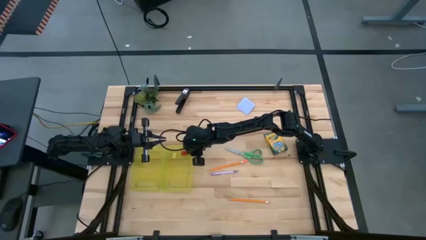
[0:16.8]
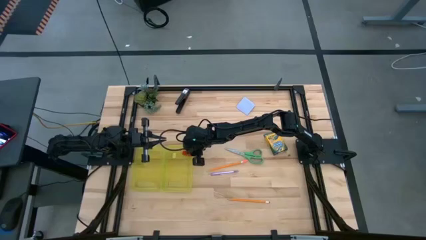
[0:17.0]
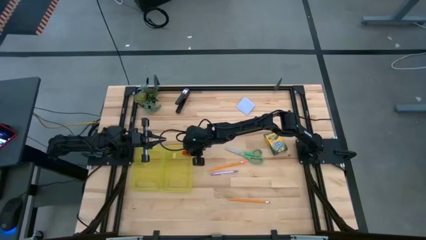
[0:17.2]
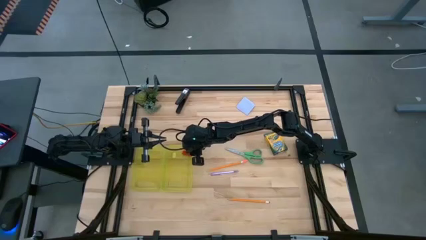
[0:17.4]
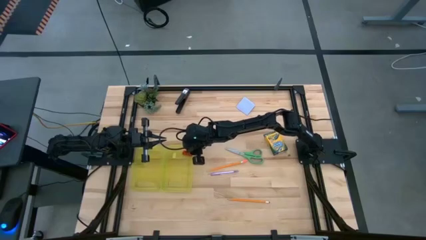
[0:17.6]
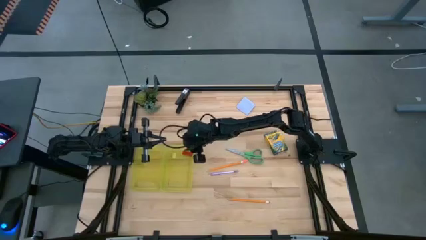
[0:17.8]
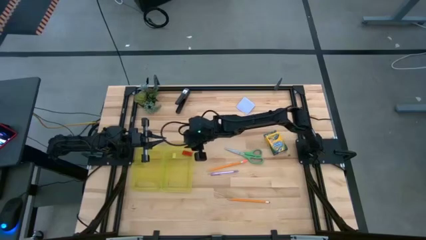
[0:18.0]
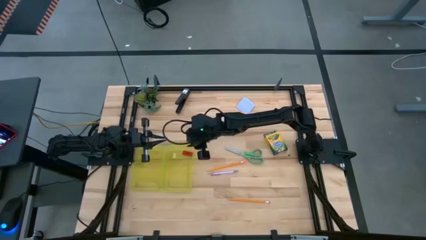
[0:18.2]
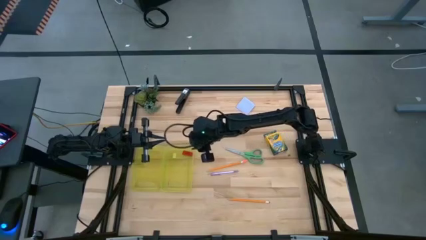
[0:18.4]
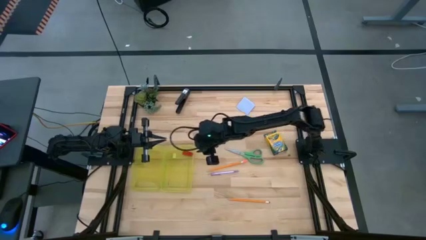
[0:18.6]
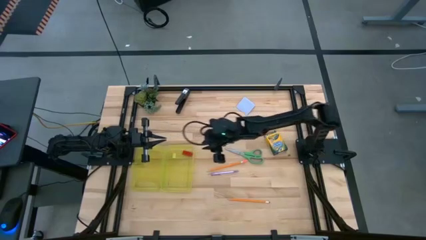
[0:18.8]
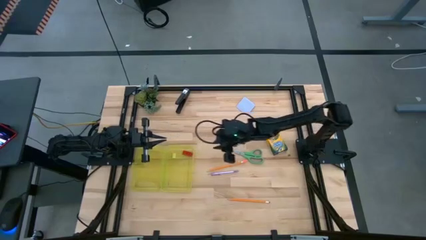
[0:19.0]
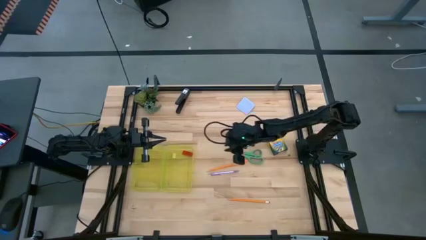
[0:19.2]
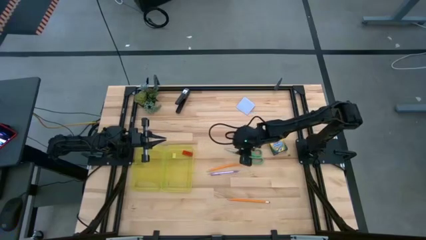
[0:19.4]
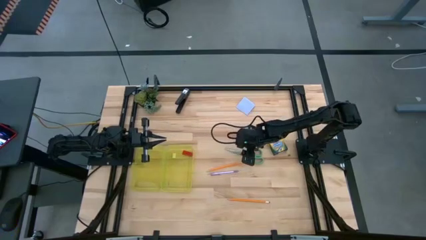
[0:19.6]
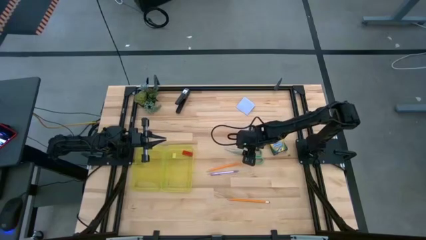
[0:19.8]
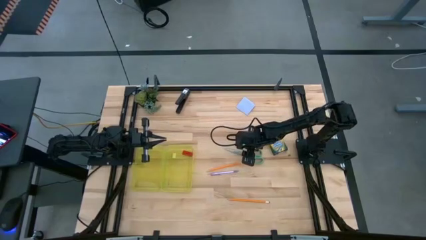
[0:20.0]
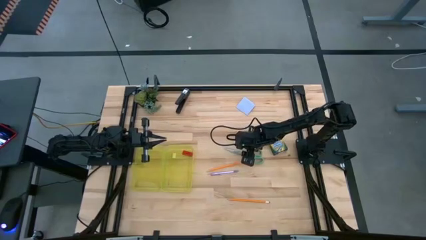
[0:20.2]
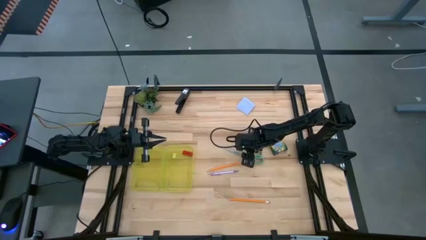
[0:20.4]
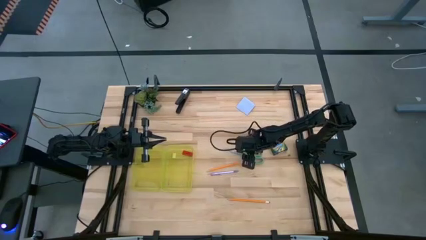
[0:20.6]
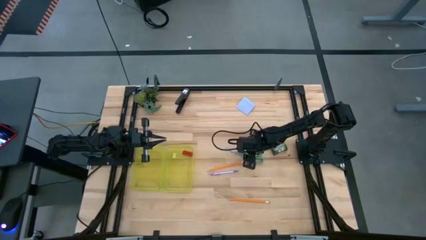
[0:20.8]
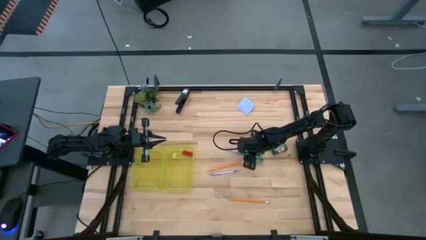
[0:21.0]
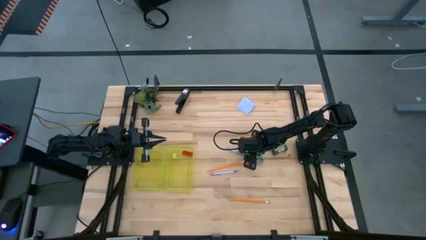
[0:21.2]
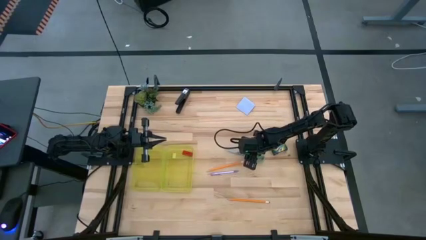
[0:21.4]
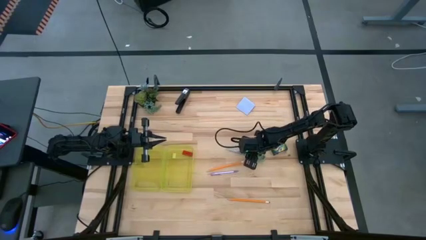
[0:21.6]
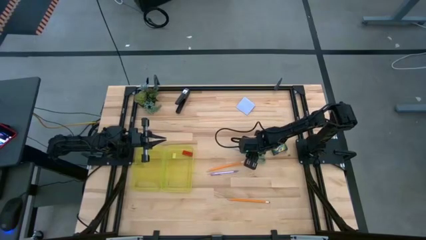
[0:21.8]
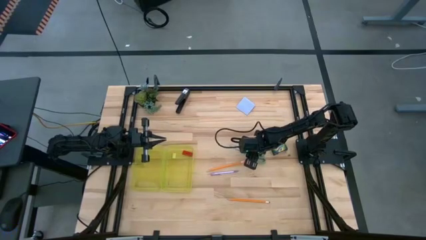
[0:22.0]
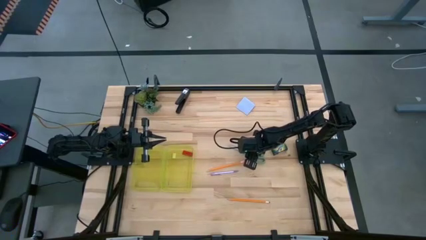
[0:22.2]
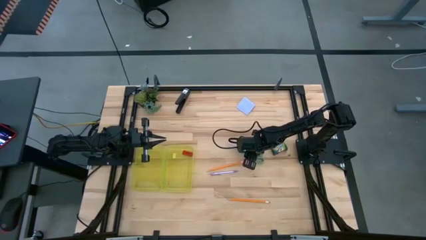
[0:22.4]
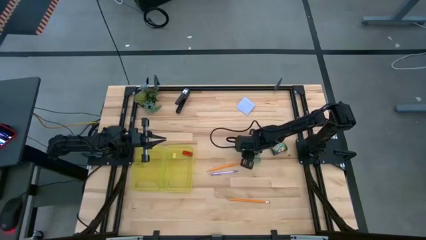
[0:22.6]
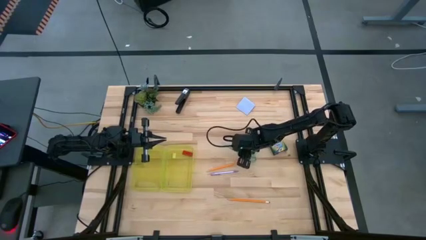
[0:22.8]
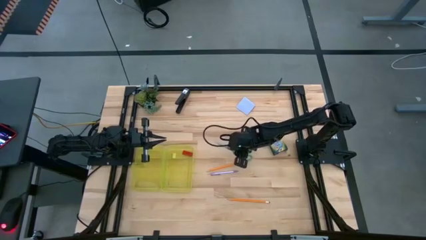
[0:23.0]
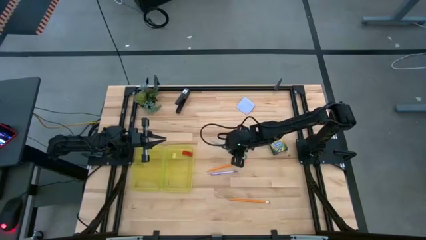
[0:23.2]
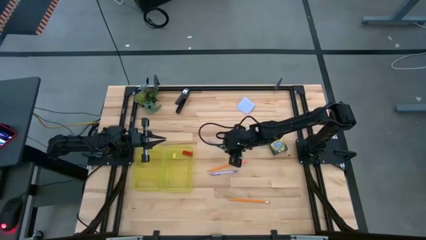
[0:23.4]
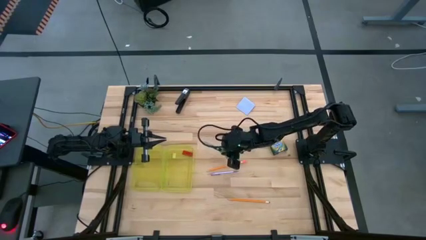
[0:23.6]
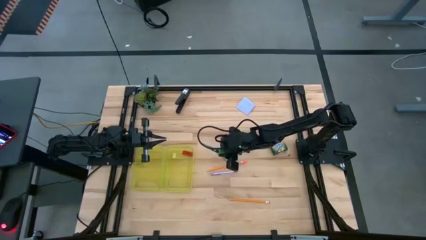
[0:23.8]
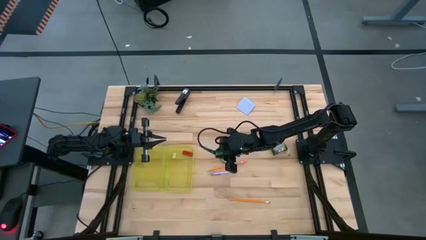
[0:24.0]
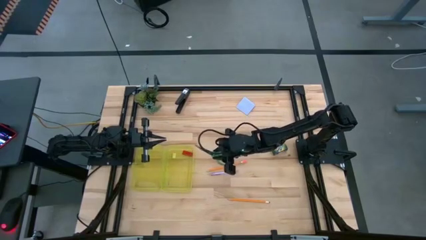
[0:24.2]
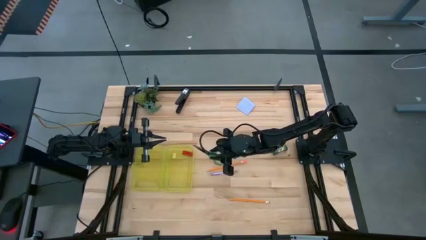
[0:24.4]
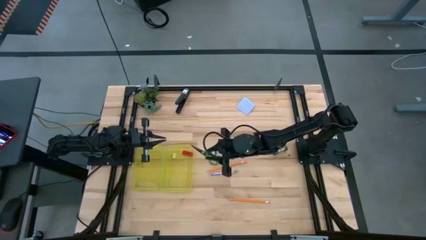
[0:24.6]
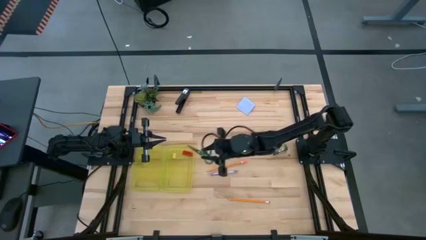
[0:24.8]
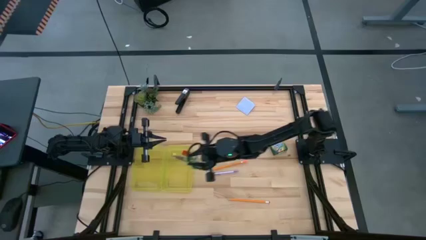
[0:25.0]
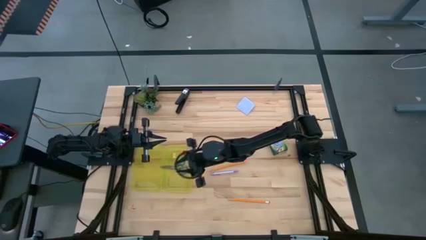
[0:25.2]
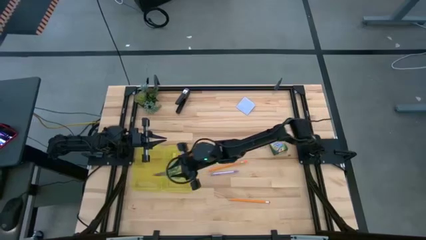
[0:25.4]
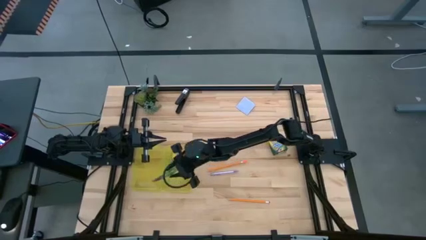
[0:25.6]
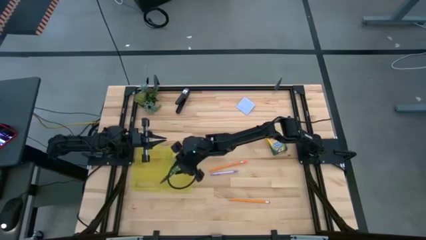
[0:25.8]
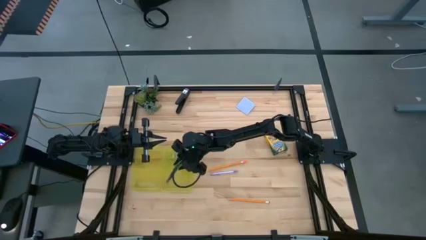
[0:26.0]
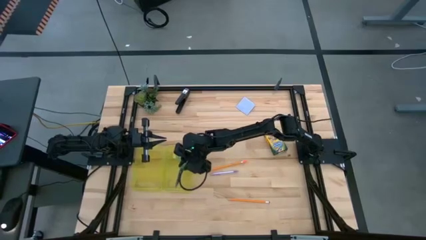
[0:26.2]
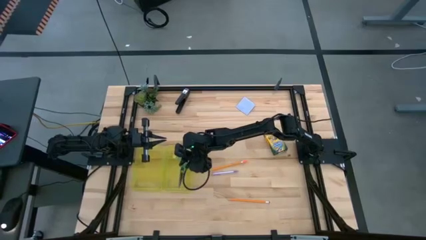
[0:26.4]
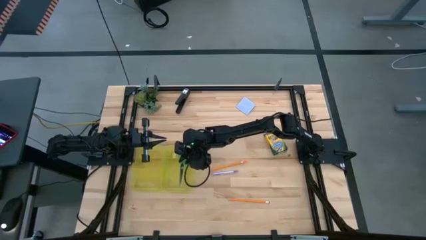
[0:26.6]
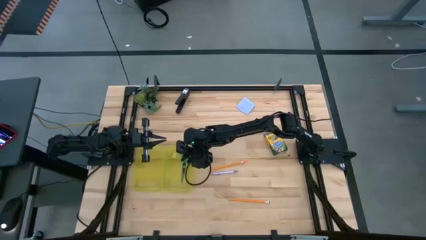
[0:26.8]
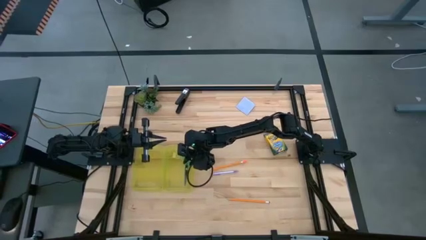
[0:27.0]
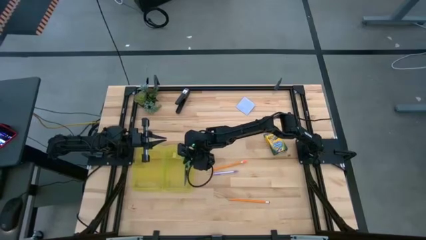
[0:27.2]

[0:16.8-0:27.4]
Task: Pack school essentials
Put the green scissors into the yellow pencil box

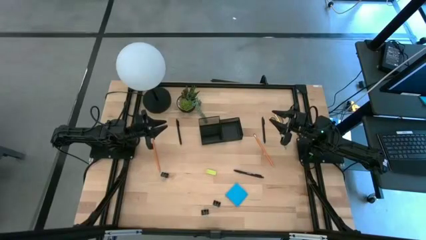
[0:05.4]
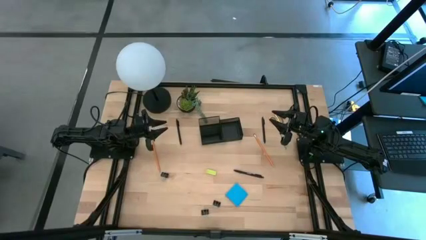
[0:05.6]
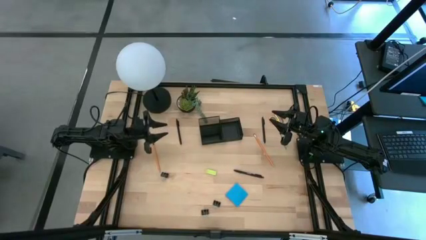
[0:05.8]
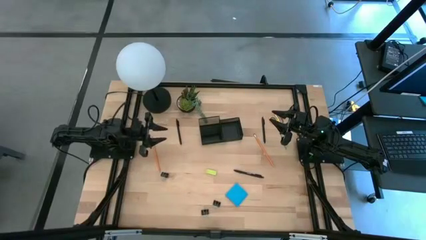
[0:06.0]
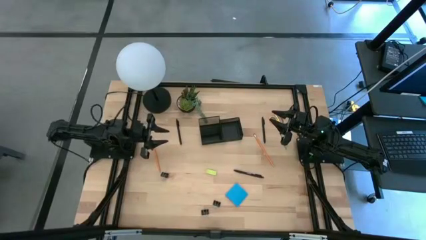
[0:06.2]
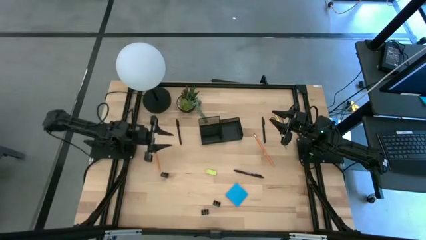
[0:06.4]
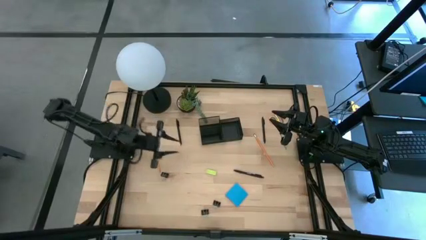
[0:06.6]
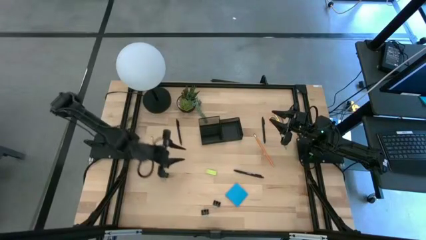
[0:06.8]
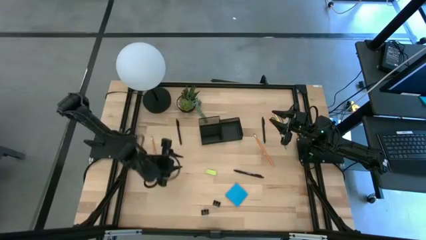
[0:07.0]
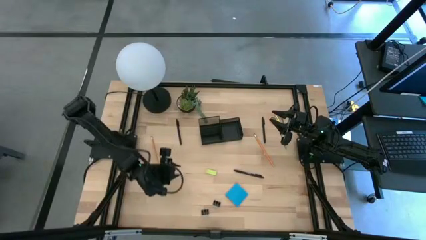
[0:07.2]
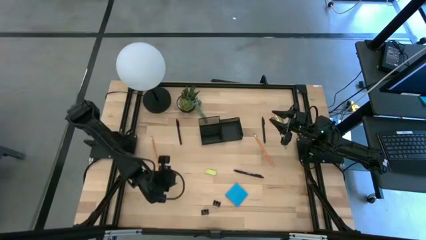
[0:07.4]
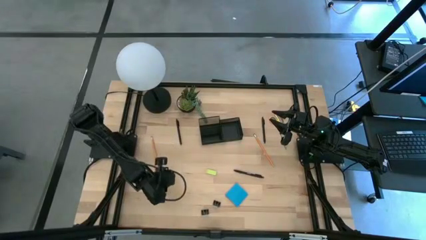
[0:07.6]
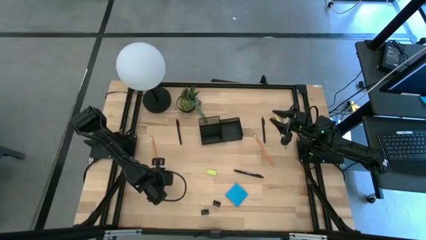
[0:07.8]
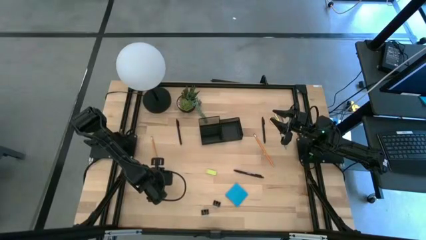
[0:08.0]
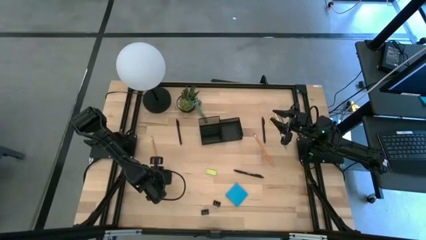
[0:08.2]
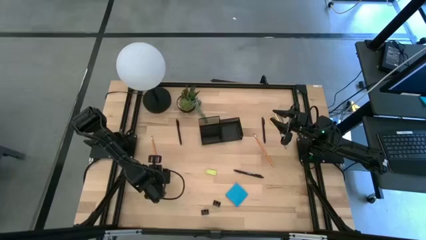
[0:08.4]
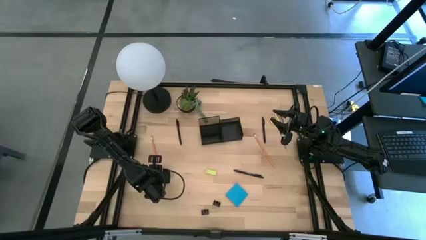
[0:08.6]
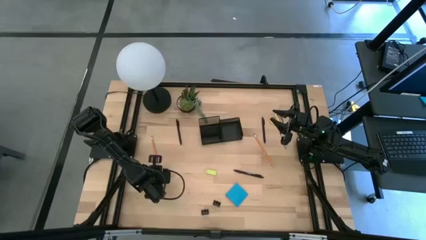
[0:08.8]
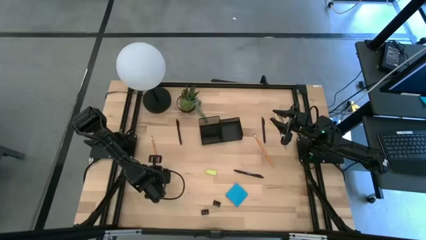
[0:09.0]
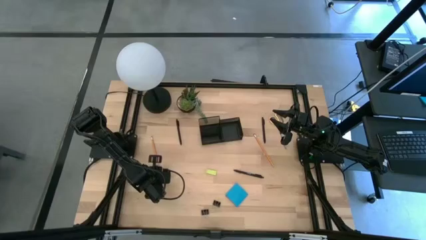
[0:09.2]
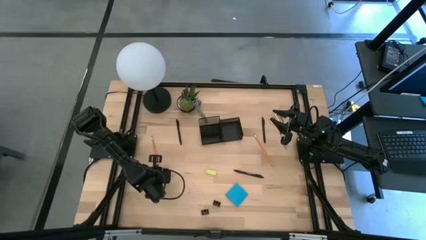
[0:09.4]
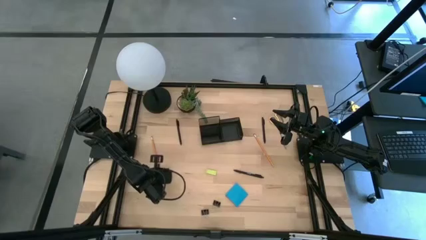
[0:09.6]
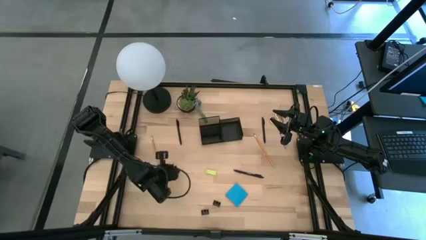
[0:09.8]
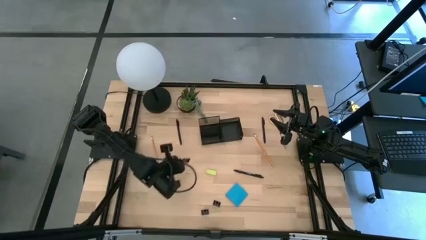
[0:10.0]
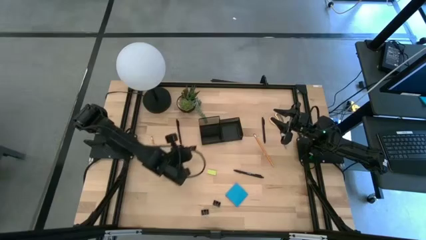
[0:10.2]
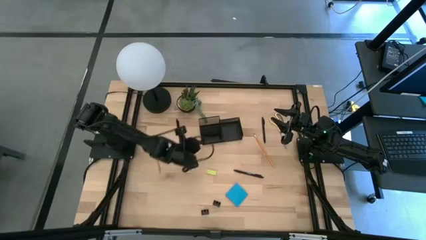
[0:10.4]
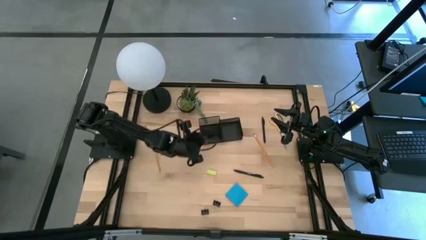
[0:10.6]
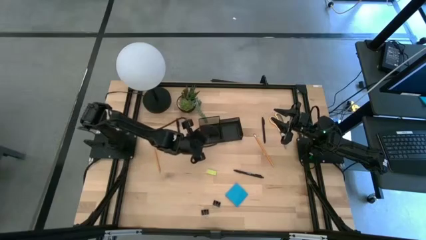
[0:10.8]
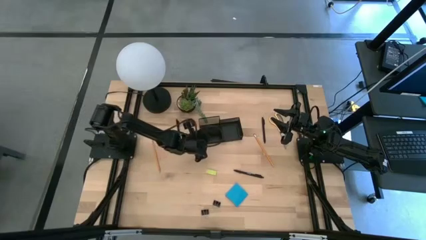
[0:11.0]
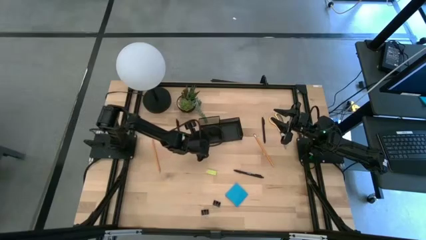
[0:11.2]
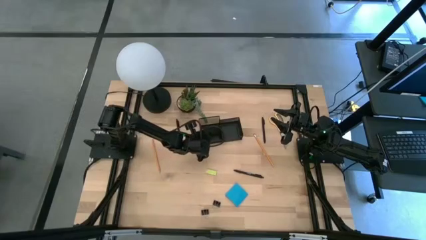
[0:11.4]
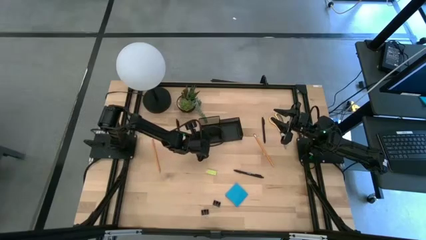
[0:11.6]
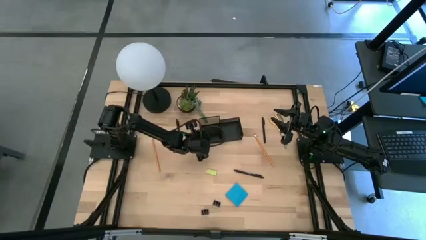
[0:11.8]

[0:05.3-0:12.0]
Task: Pick and place office supplies into organizer
Put the top left black binder clip into the desk organizer
